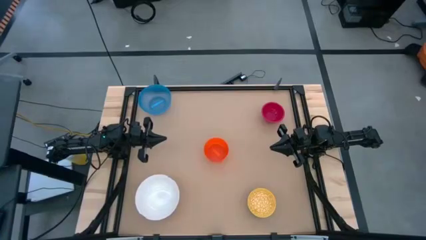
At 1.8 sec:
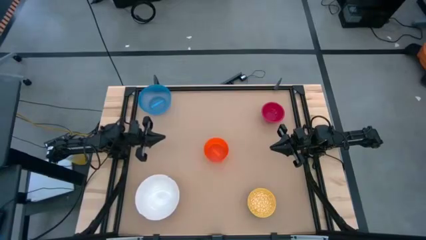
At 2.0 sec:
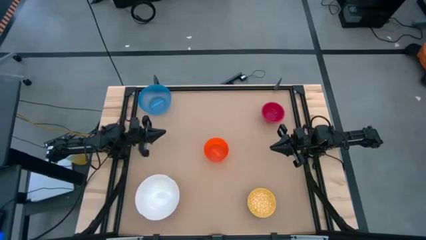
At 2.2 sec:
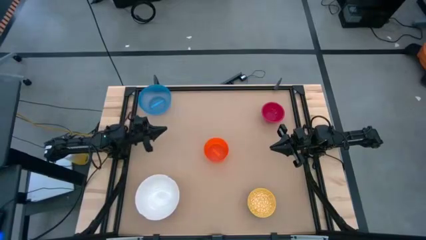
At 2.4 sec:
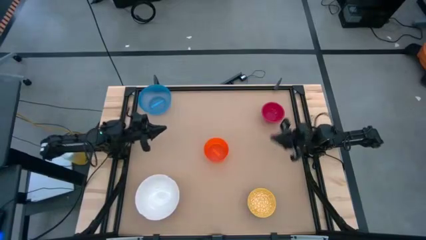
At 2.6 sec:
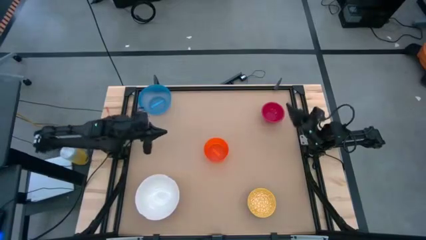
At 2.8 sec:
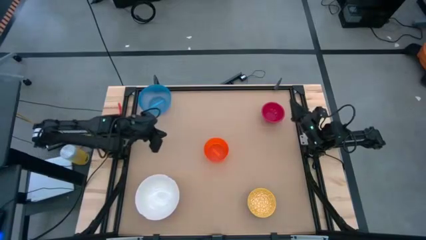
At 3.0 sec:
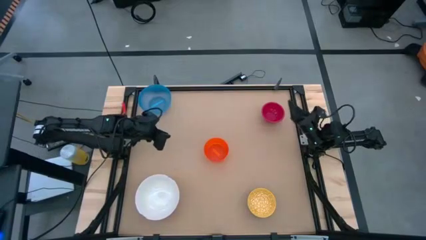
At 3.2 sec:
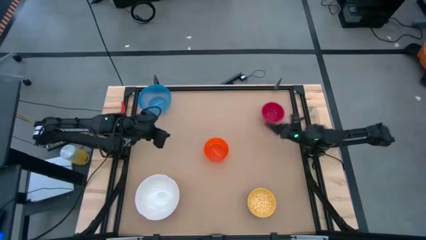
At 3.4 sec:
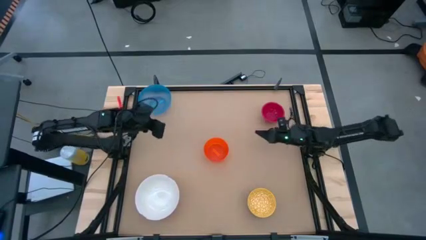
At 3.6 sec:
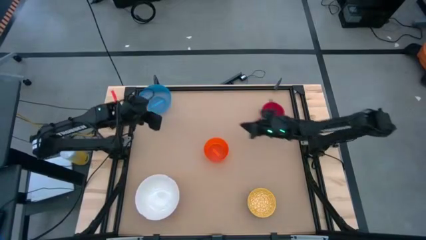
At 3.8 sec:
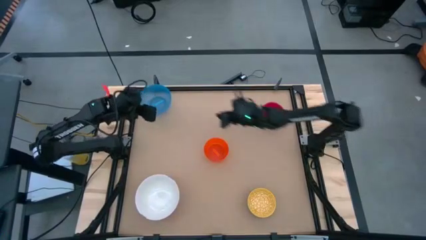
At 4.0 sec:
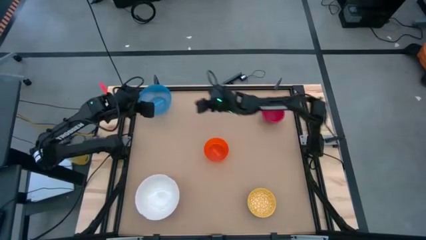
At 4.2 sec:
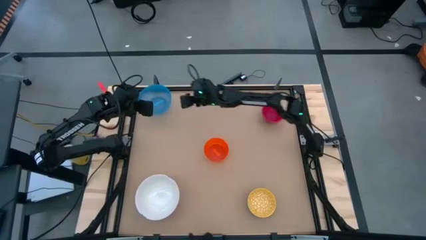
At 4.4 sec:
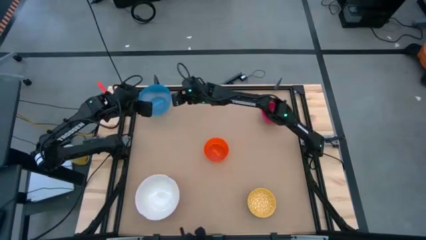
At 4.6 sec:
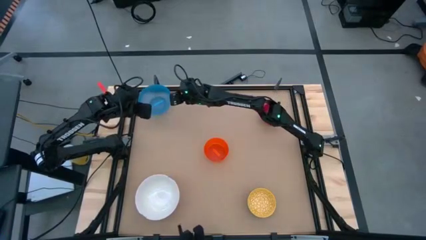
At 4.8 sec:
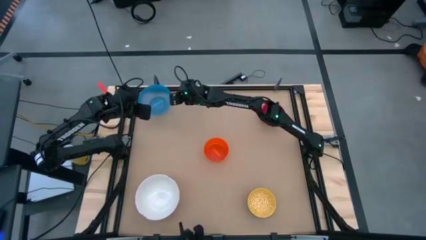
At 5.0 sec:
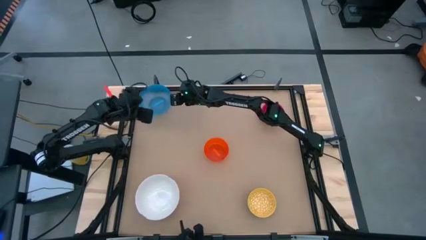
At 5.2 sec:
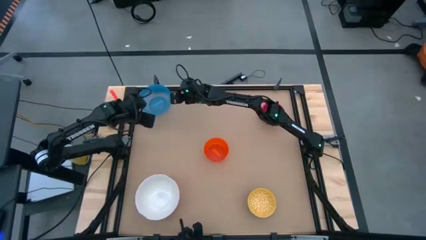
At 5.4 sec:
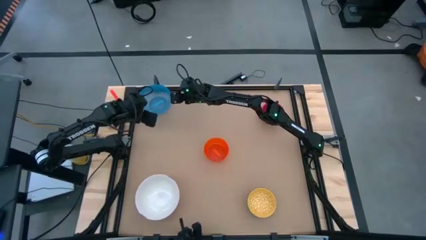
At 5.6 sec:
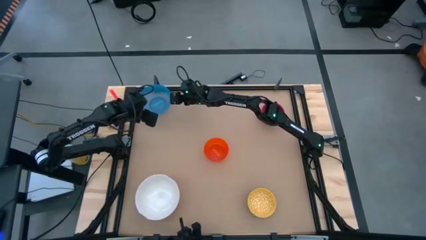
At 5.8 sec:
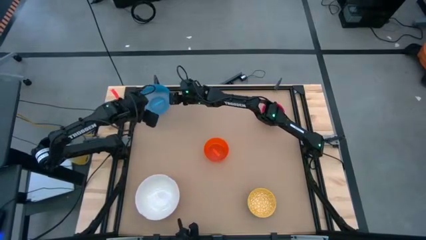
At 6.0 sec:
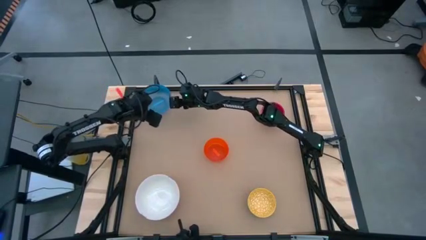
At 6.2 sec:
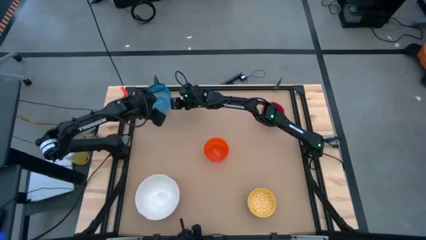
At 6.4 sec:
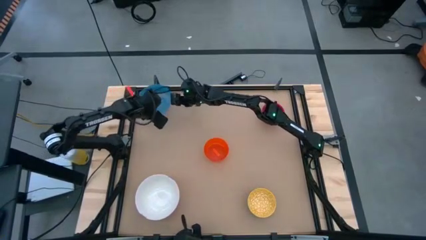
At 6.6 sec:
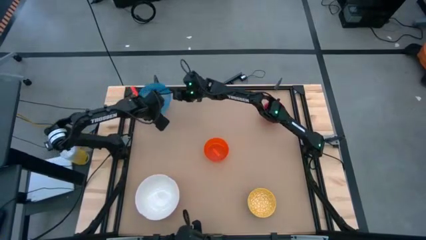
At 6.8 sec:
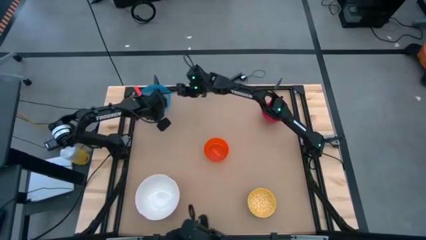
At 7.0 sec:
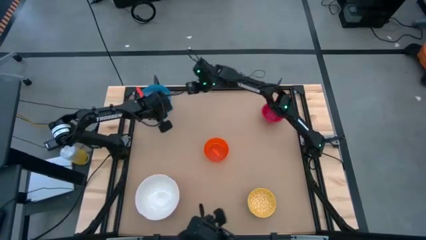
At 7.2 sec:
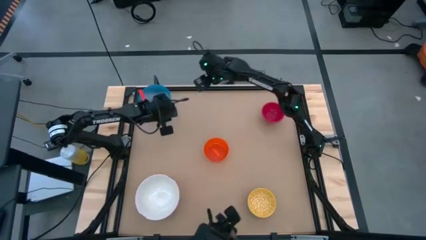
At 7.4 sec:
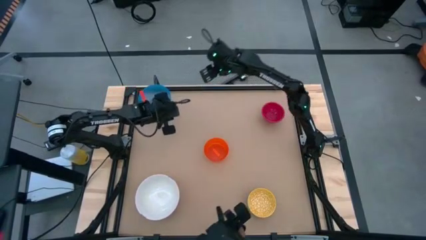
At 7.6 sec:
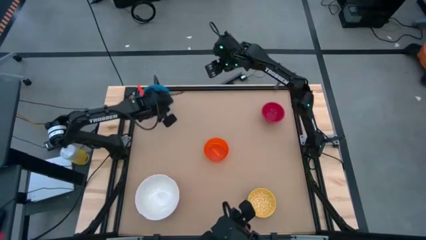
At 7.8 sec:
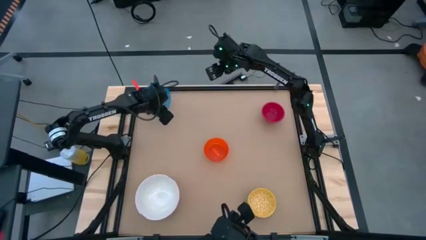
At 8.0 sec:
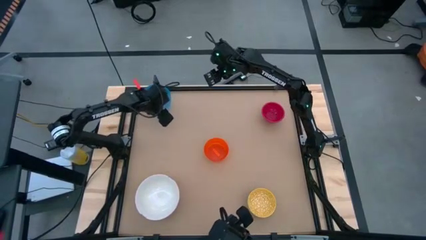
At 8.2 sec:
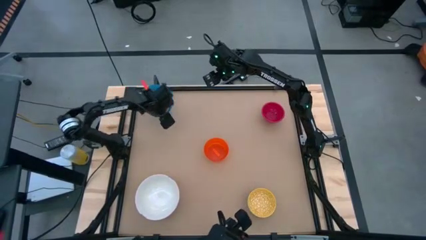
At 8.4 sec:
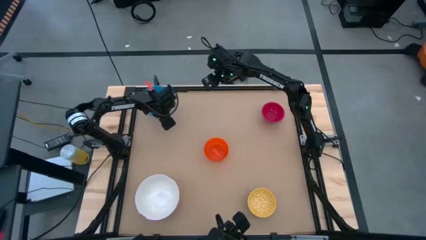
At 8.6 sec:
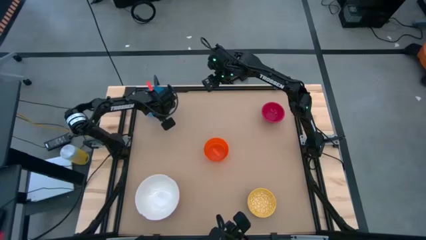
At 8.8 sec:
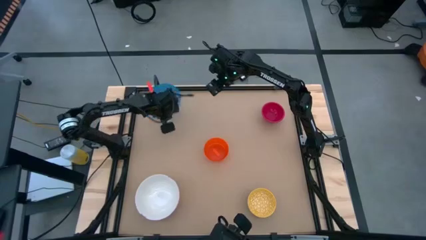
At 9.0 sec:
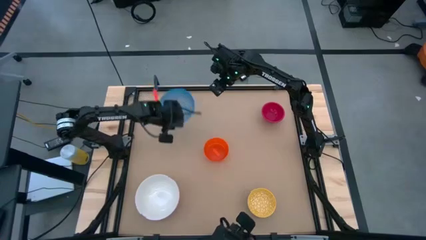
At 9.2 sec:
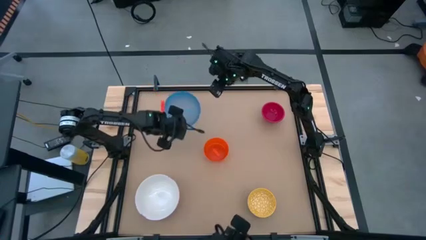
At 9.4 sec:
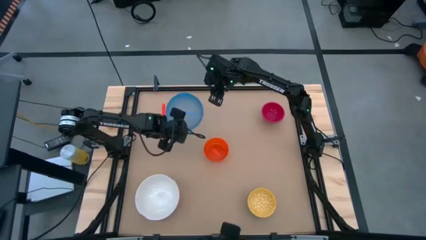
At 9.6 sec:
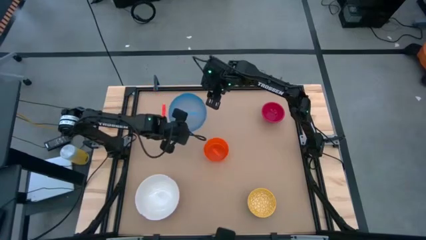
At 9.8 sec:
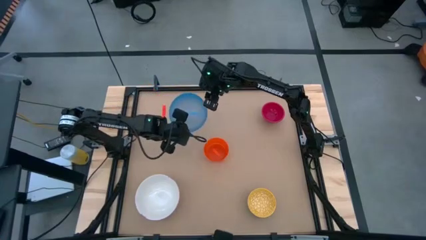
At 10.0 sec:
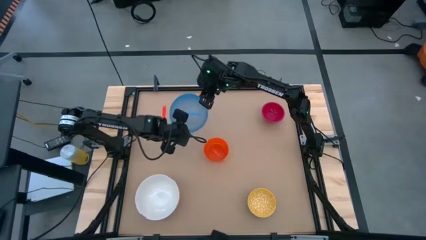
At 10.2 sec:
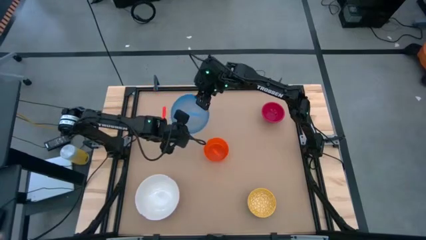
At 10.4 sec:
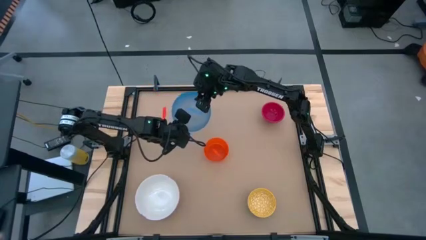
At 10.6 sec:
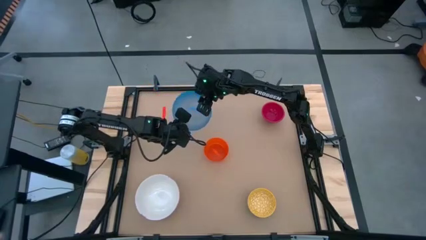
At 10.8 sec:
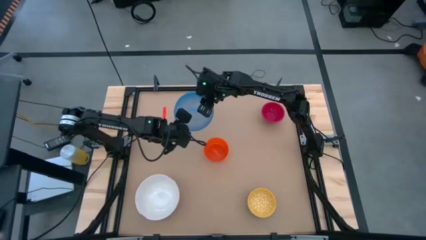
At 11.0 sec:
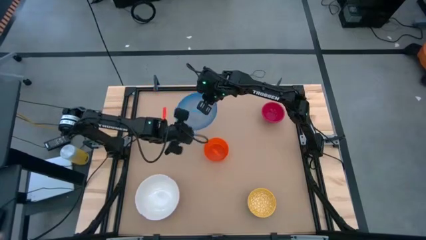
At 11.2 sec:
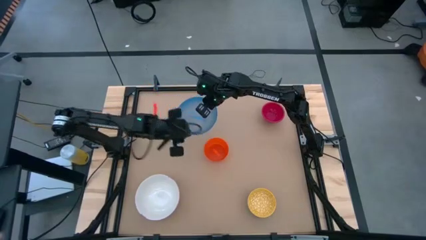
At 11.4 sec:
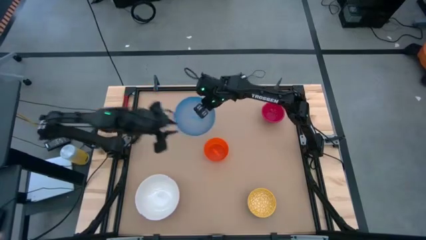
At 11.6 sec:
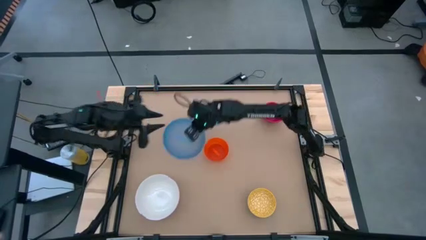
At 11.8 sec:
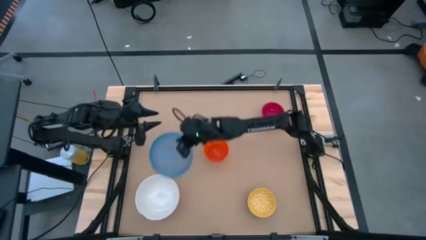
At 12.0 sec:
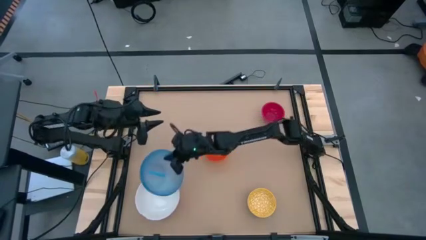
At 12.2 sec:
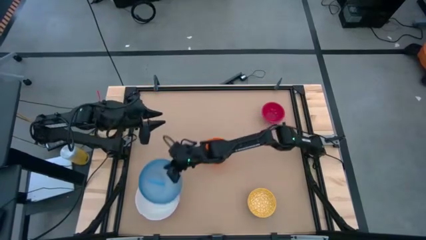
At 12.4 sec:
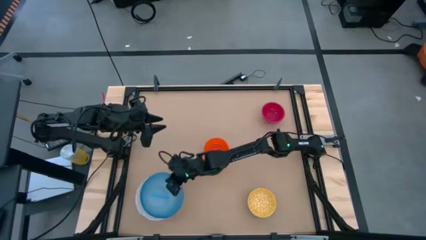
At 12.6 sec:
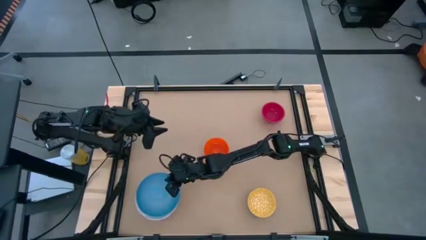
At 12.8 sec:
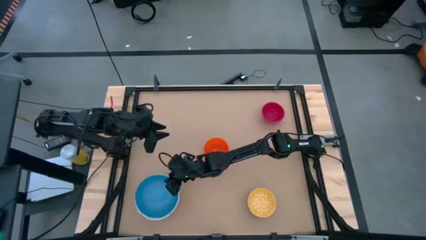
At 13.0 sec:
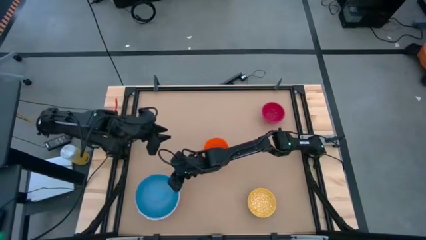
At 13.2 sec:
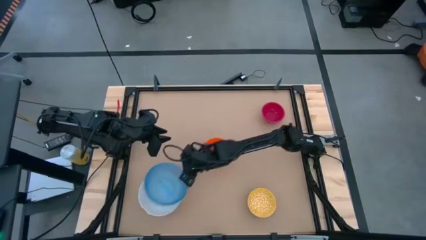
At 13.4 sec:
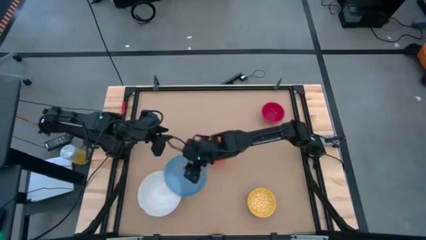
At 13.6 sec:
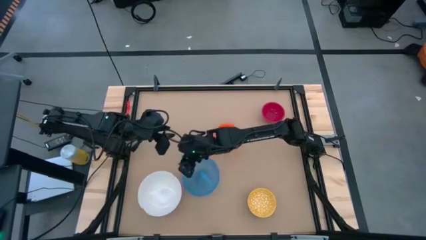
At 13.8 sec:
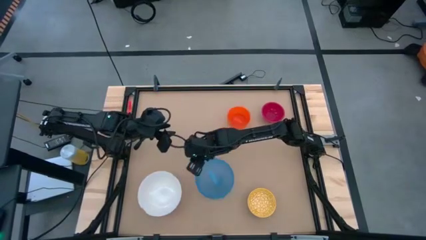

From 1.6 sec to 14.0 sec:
Stack the blue bowl on top of the white bowl
